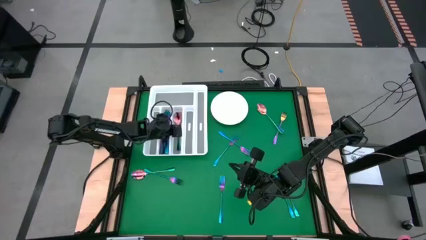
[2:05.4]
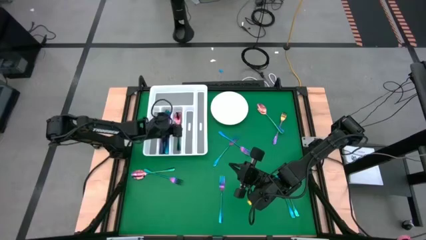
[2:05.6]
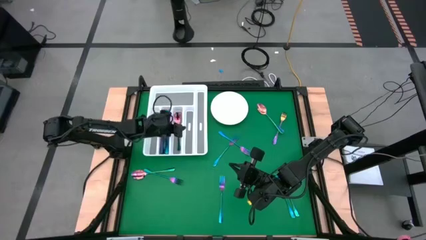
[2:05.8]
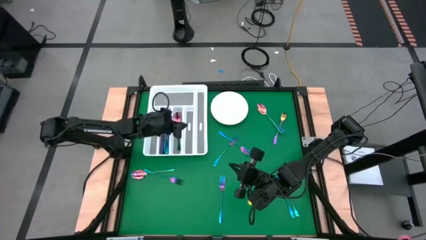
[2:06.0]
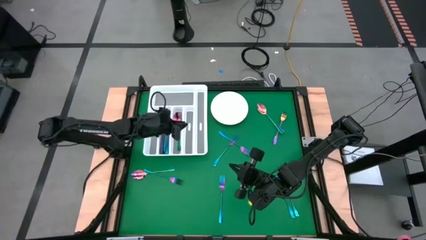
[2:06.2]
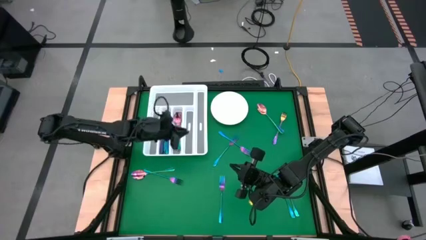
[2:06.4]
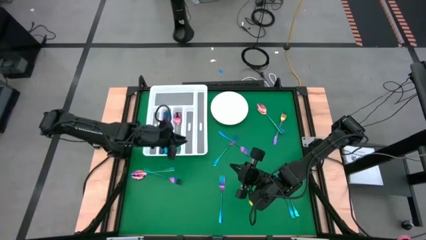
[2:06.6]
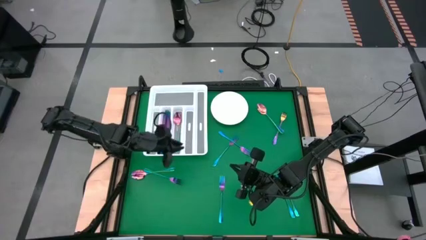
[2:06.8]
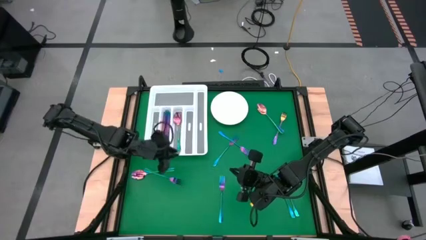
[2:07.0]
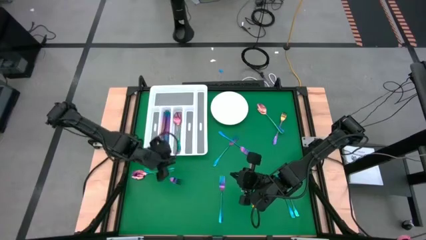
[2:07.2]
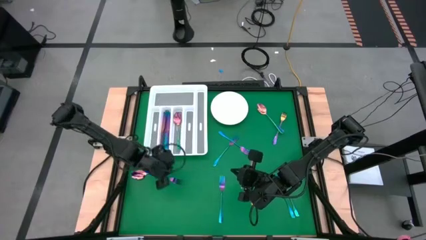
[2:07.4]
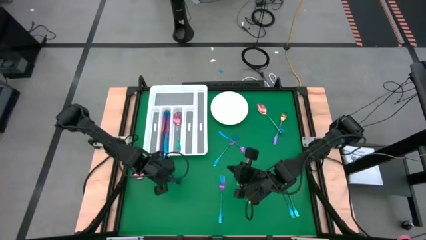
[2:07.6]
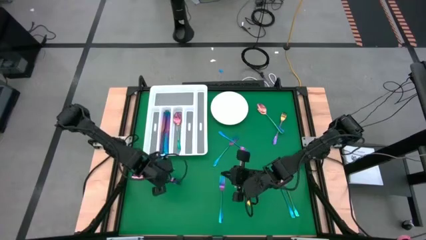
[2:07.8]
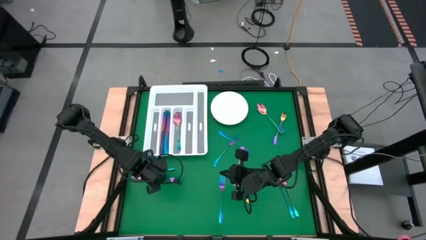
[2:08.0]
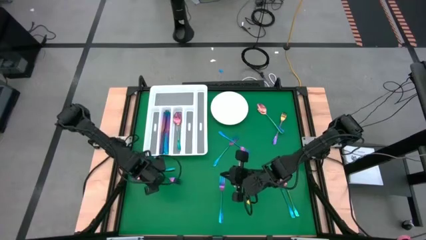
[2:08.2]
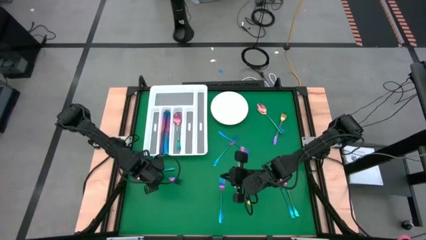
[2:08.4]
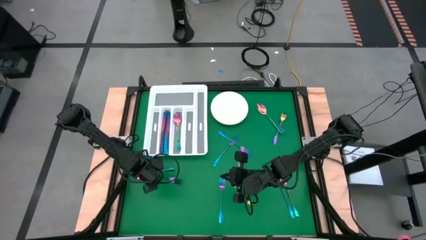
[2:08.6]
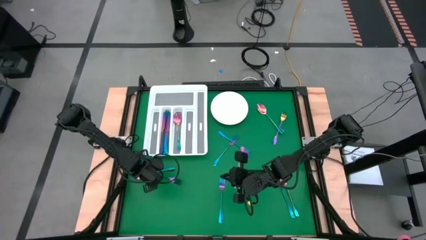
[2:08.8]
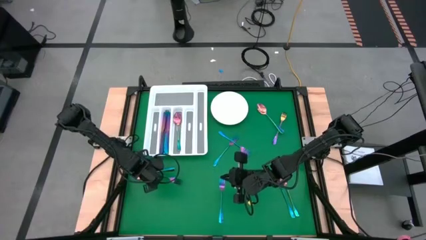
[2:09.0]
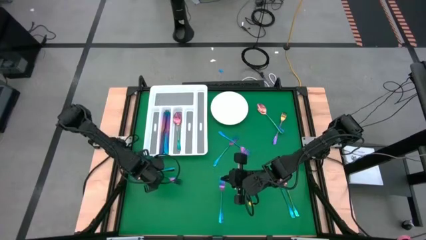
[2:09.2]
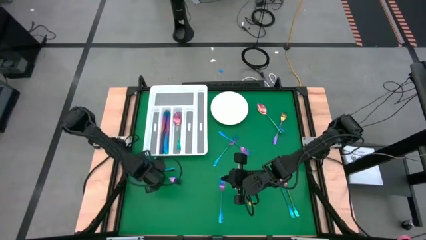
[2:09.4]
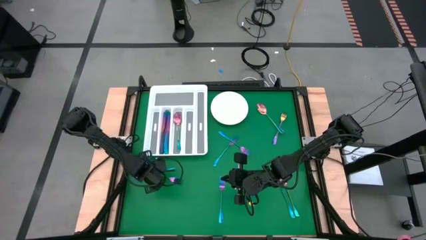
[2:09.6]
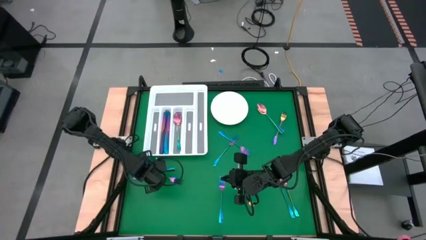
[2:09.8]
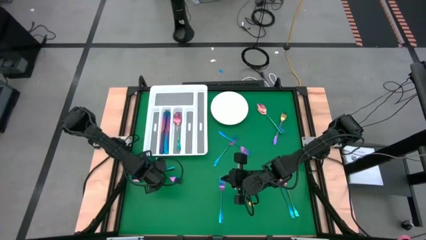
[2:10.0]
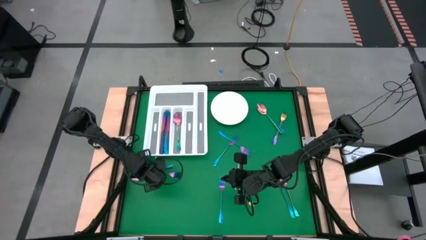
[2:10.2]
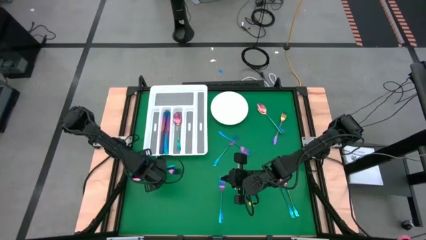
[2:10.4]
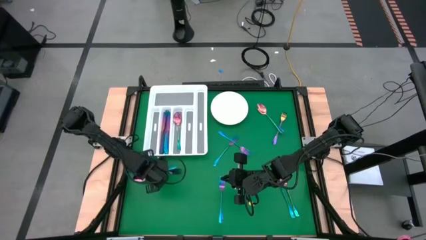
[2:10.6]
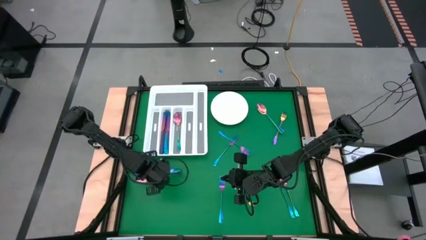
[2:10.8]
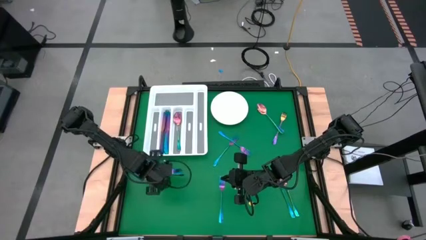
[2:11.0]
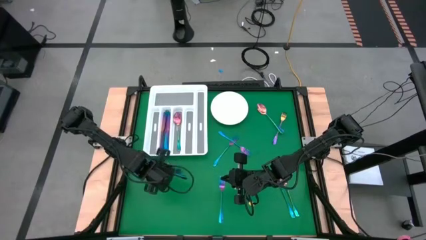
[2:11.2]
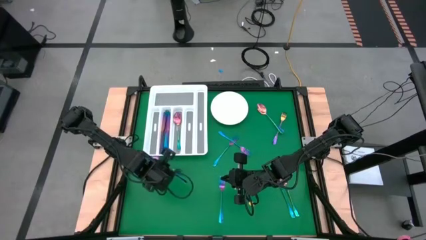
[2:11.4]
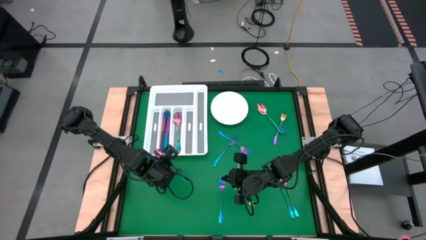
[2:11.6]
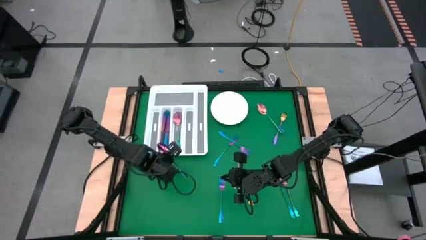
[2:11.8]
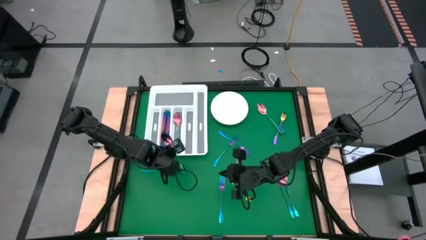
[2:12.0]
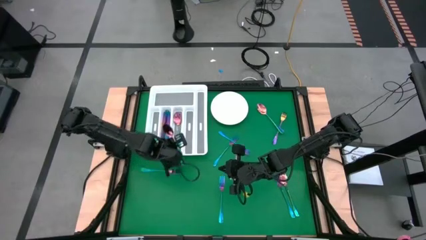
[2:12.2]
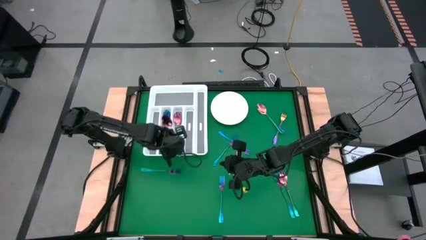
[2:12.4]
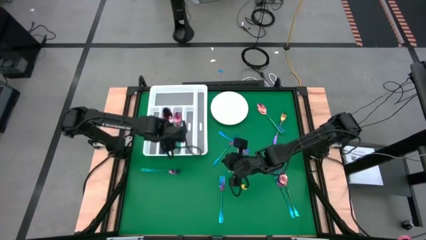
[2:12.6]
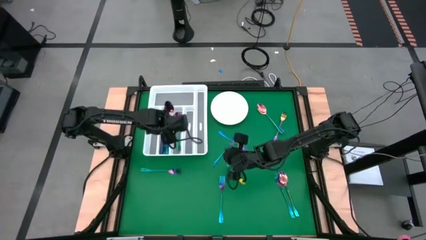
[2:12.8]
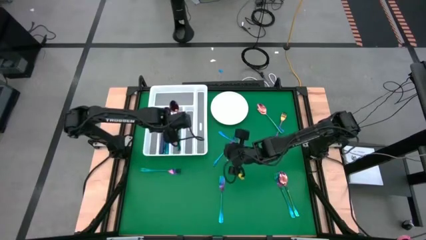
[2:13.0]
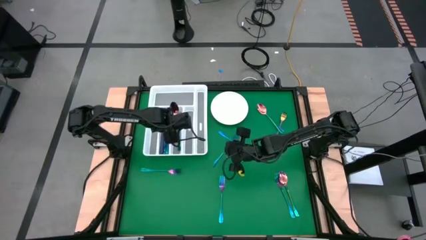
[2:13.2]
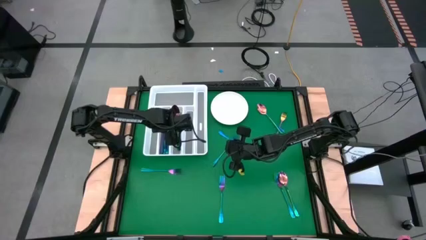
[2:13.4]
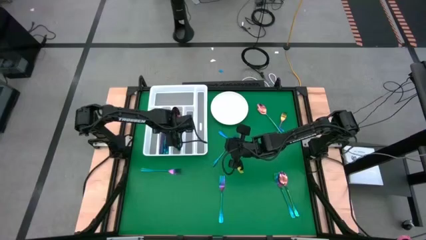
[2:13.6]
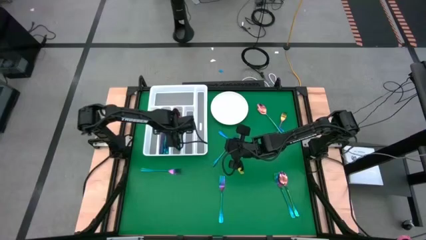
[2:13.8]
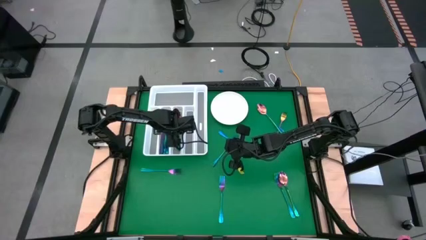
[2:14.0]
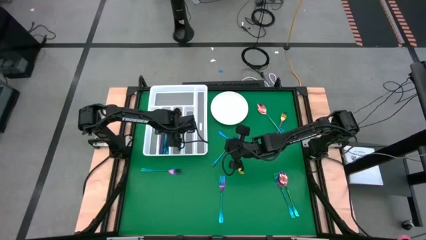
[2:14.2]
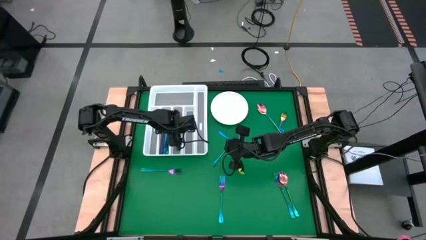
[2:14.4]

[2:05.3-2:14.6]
Task: Sort silverware
Put the blue spoon into the silverware tray

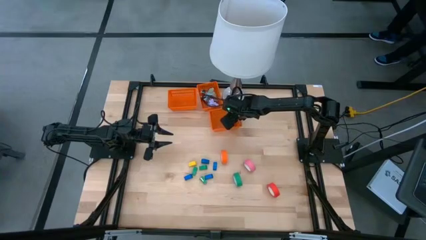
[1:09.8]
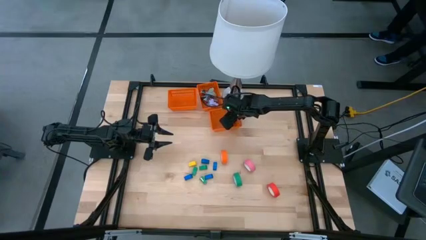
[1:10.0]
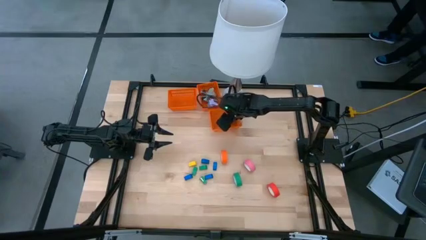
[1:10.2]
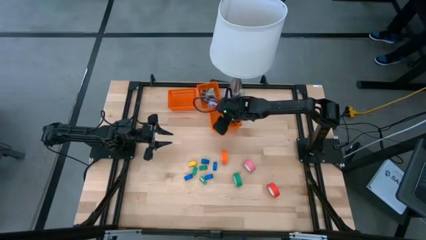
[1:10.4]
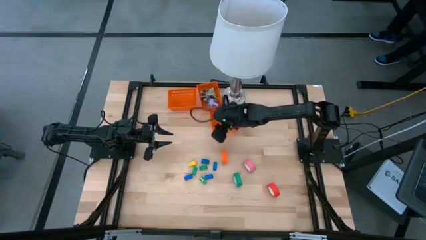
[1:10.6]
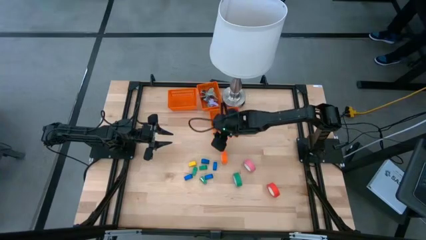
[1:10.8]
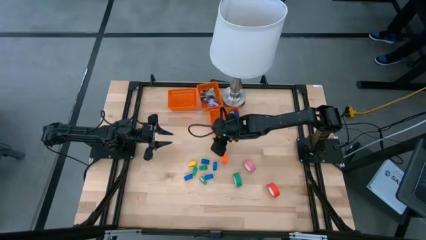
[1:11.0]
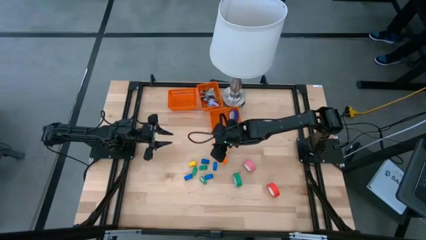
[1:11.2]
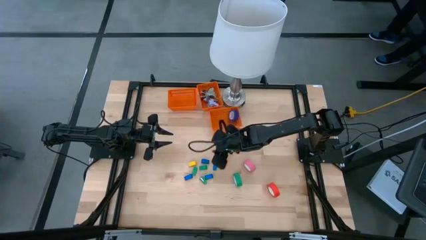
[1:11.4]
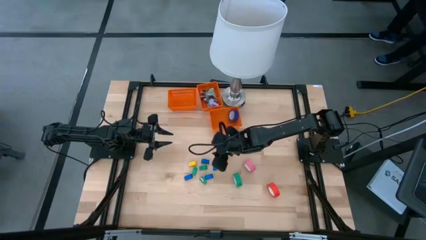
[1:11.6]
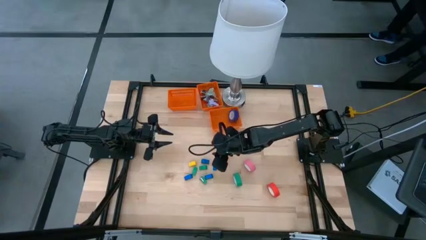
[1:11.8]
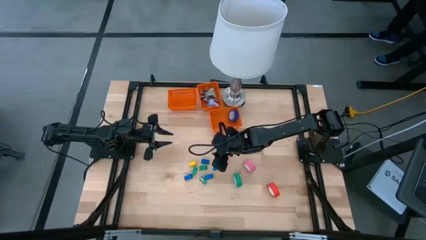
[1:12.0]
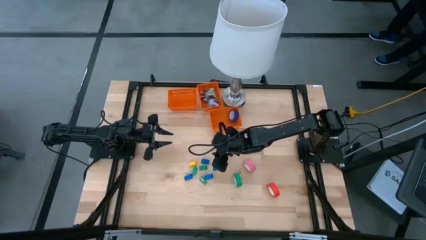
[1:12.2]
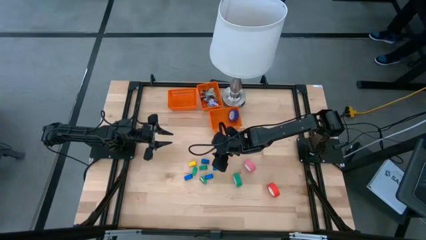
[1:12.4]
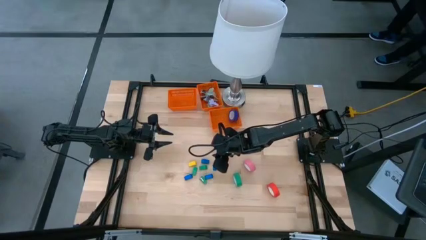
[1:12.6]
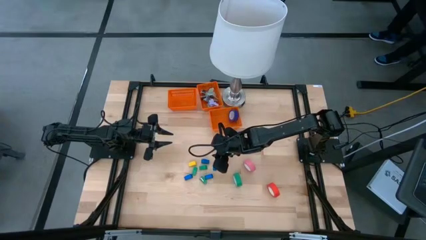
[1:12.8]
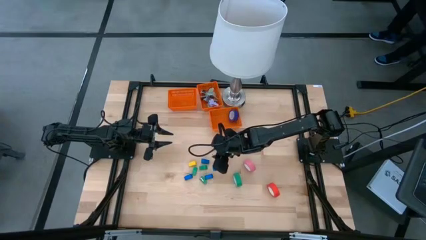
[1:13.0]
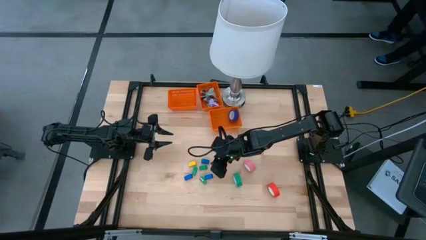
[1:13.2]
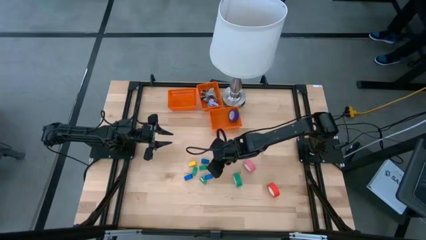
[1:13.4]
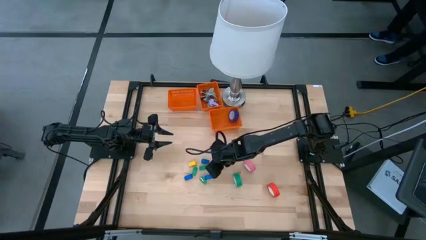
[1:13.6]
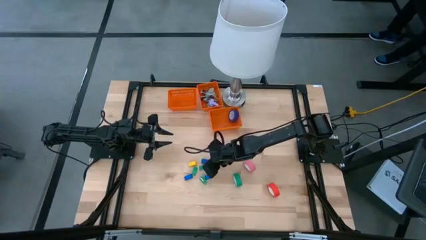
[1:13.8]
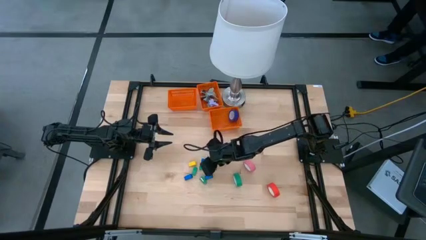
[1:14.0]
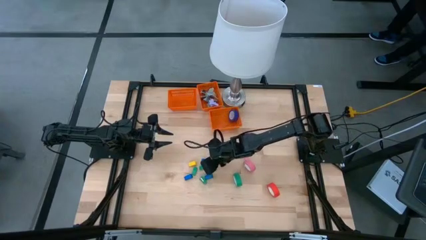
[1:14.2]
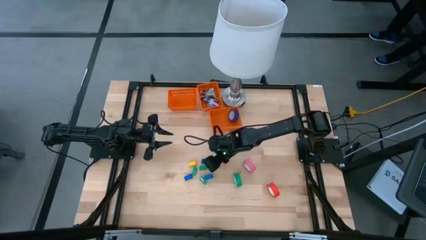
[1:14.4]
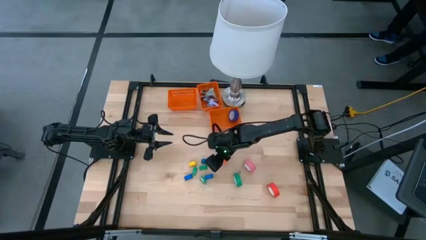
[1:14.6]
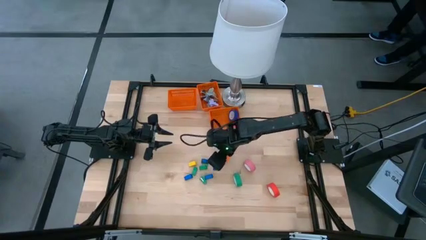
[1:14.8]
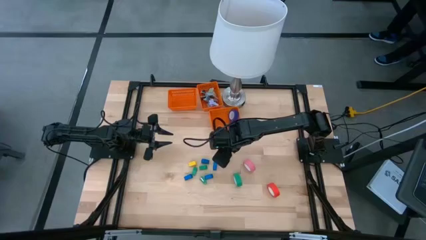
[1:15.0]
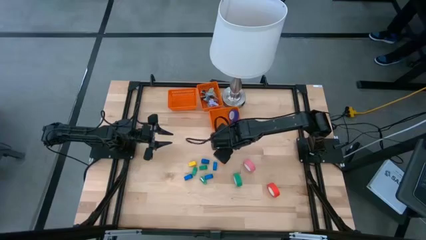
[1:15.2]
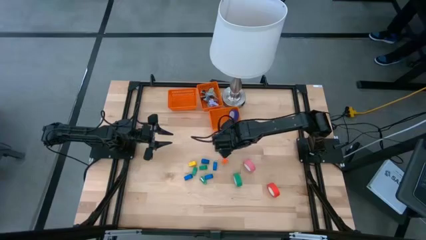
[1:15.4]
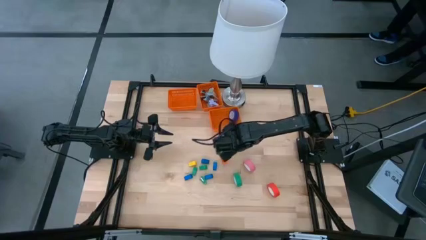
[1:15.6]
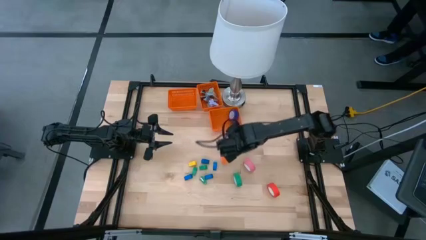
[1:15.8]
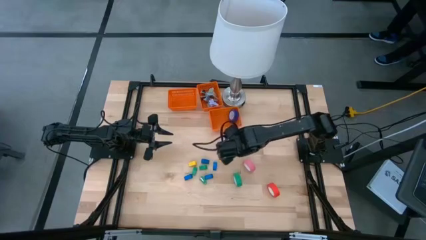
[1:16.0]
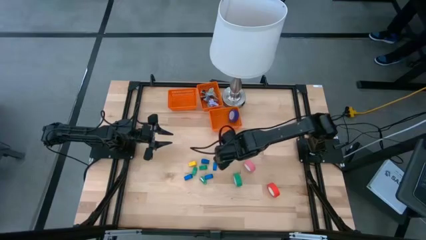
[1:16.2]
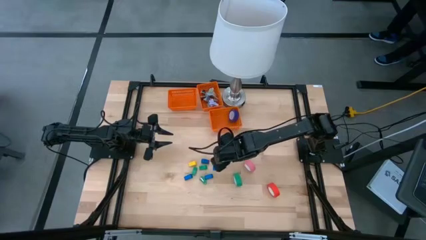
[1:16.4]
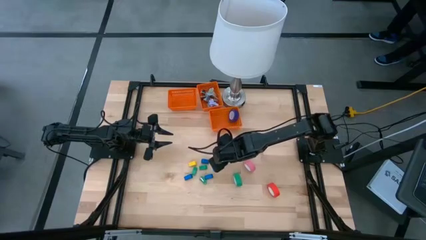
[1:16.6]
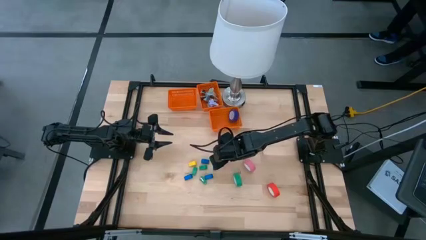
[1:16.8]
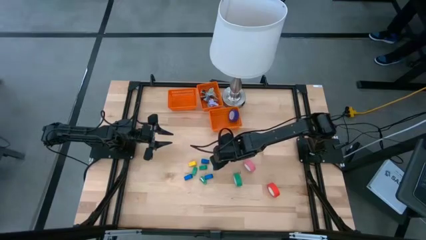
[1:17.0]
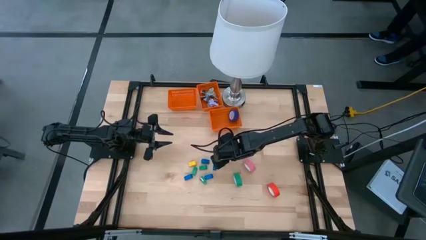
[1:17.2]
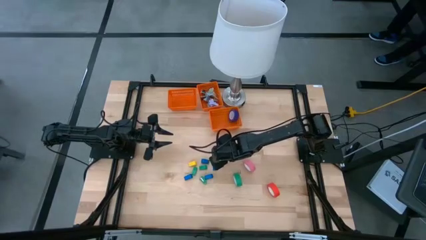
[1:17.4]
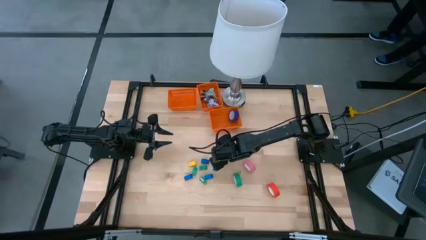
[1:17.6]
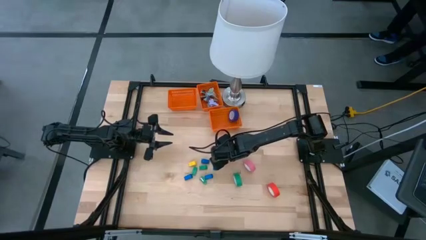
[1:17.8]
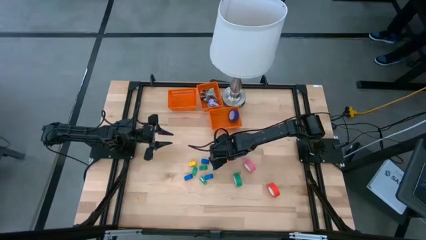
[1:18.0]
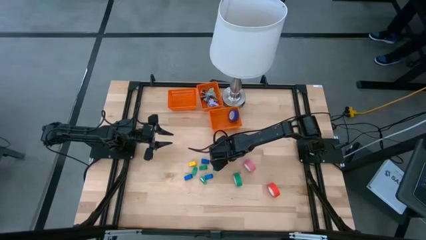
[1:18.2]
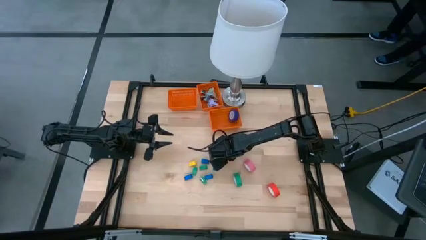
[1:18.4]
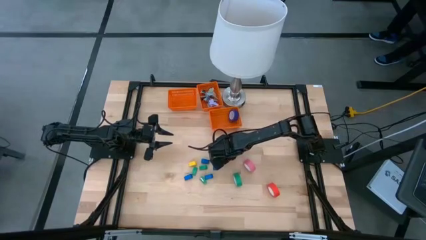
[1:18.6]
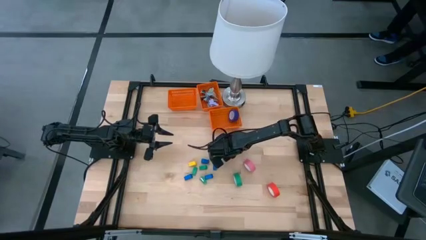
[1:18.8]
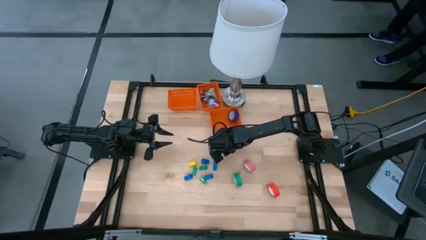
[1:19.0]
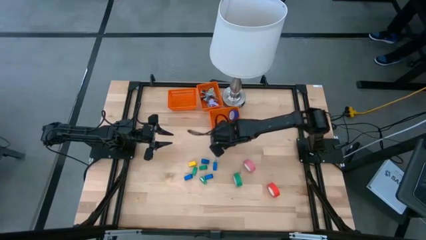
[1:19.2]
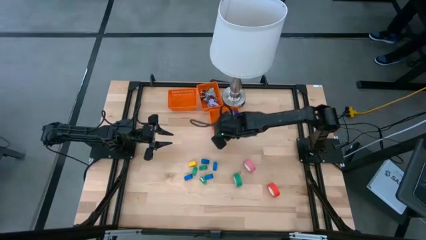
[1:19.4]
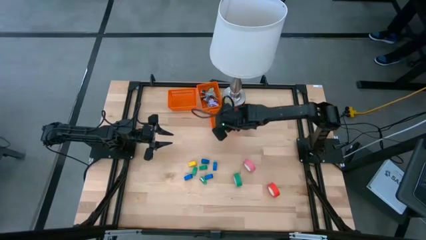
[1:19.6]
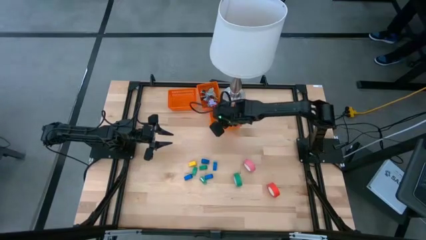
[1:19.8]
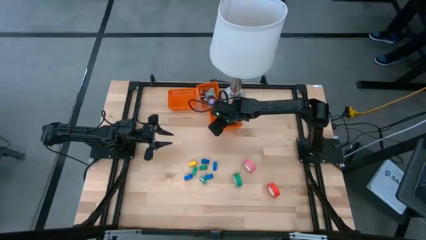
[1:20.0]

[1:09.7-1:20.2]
Task: Pick and place Stapler, Stapler remover, tape
Put the orange tape into the bottom right orange basket
